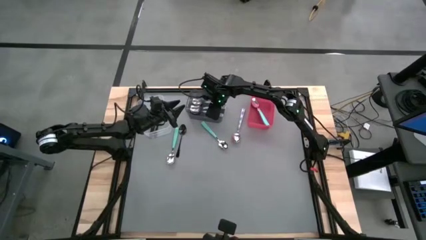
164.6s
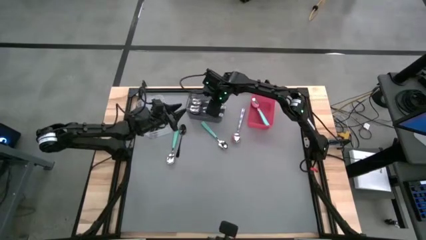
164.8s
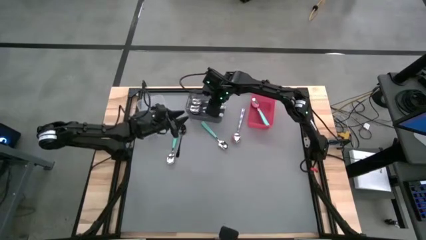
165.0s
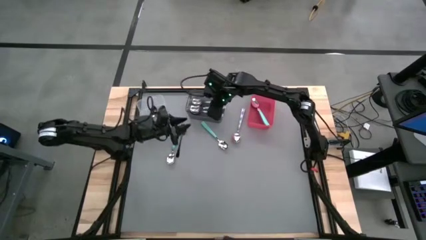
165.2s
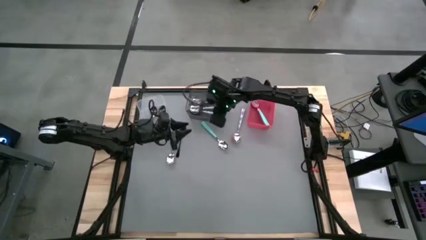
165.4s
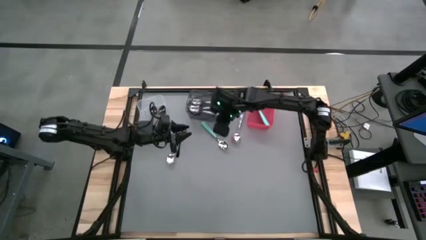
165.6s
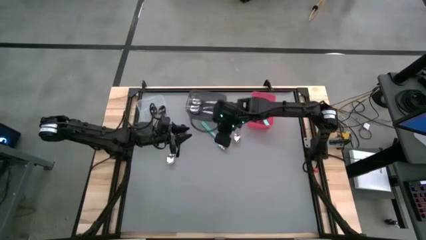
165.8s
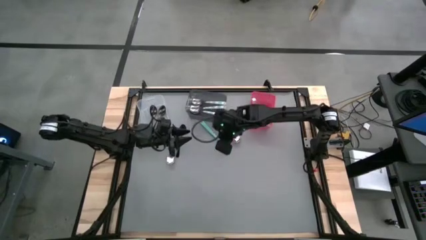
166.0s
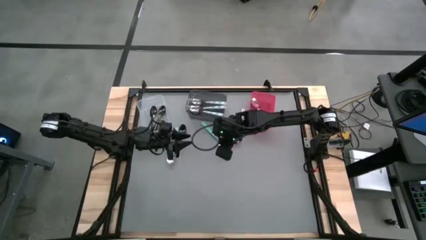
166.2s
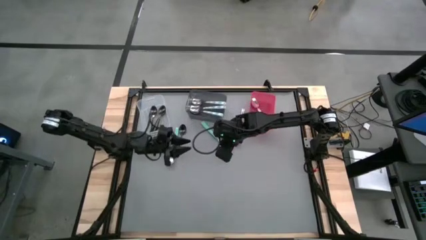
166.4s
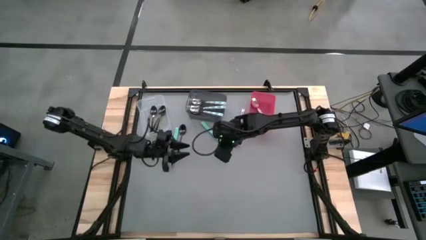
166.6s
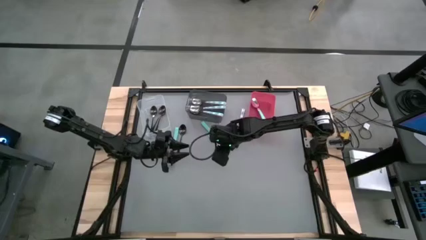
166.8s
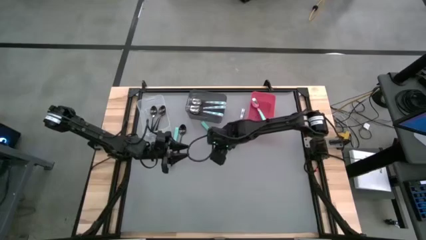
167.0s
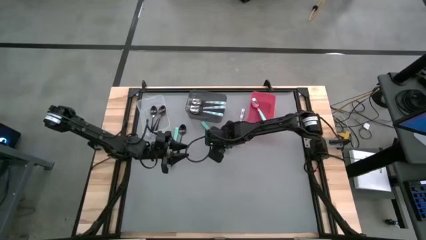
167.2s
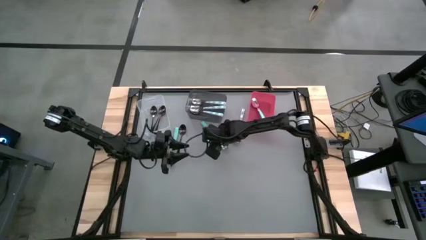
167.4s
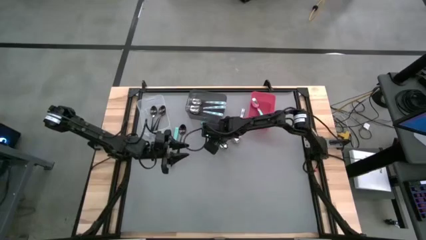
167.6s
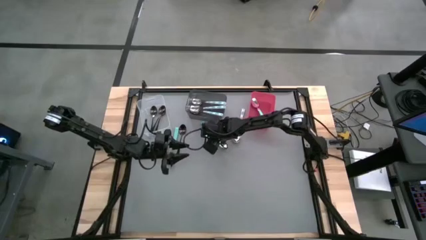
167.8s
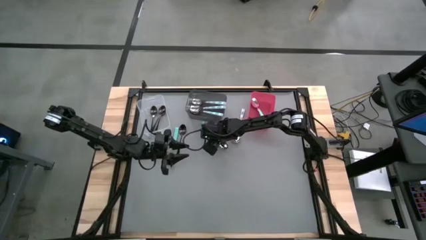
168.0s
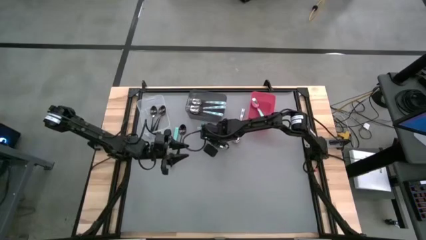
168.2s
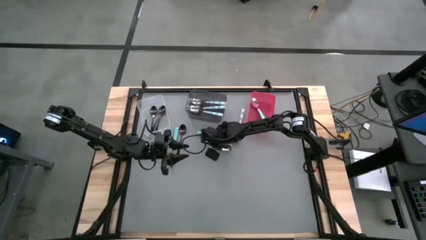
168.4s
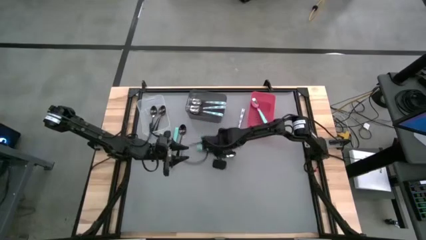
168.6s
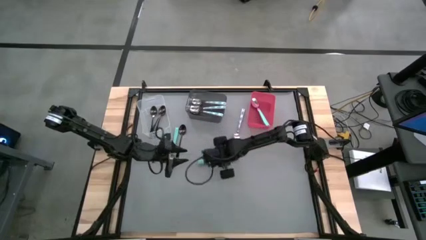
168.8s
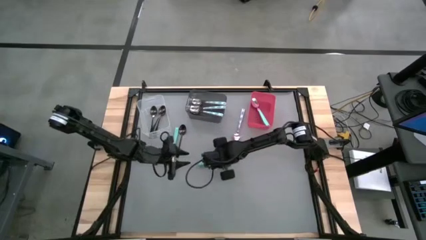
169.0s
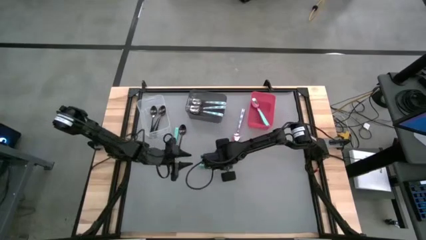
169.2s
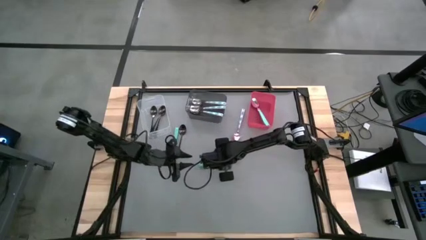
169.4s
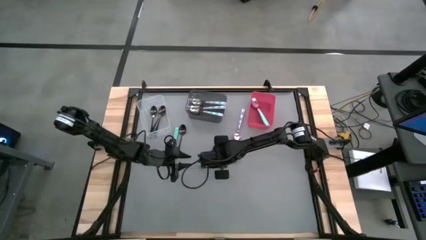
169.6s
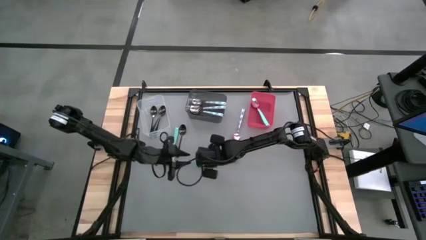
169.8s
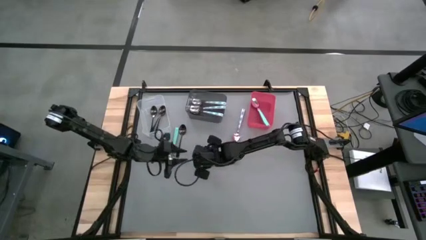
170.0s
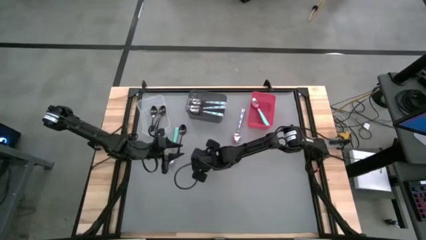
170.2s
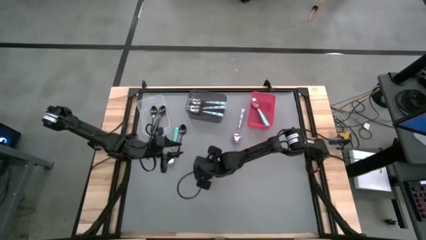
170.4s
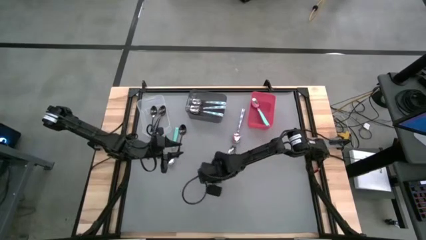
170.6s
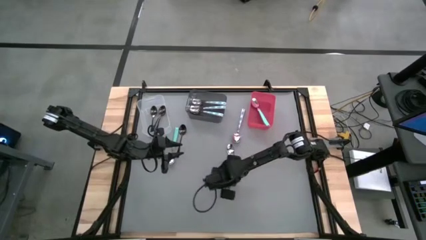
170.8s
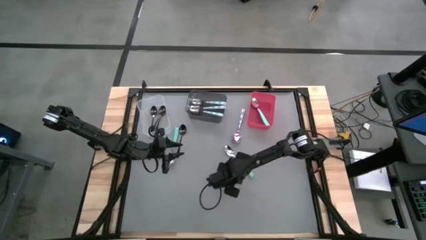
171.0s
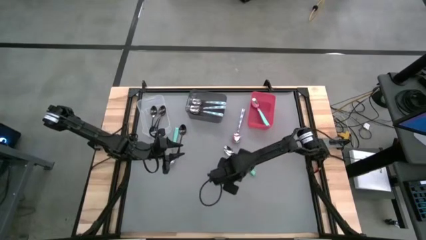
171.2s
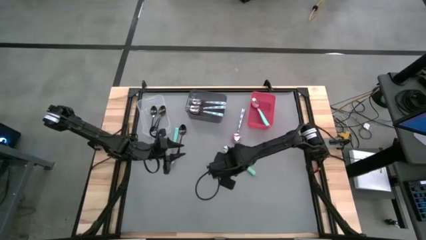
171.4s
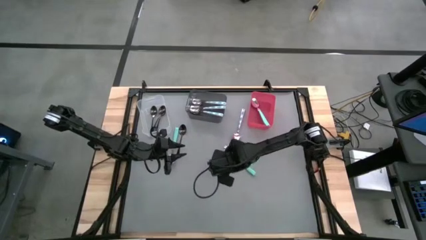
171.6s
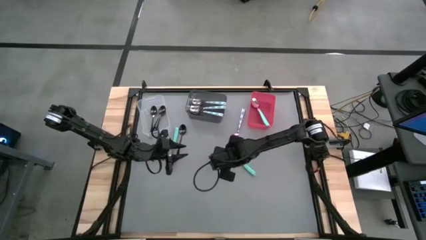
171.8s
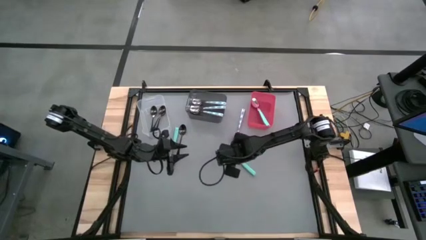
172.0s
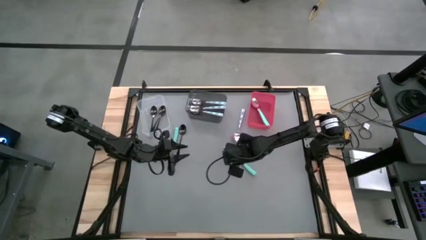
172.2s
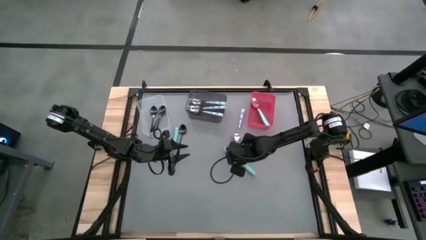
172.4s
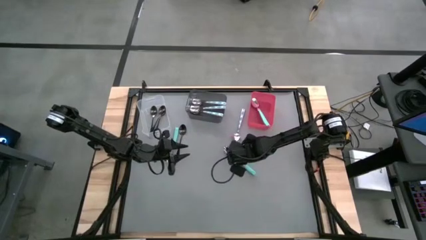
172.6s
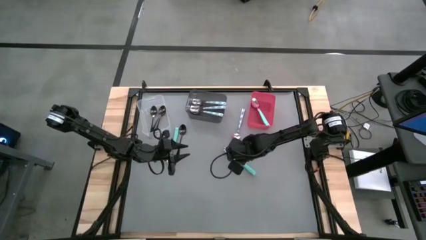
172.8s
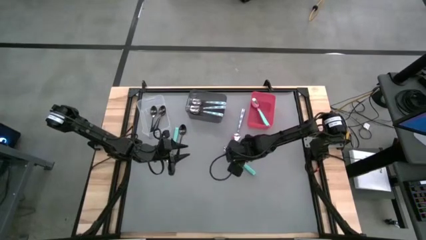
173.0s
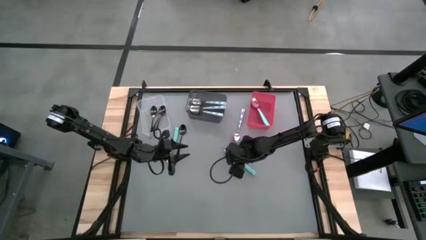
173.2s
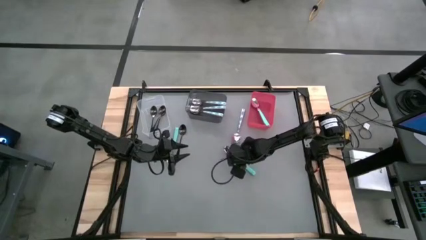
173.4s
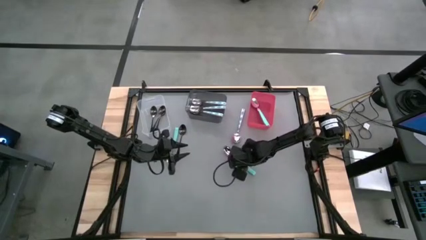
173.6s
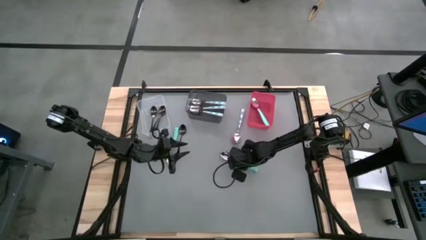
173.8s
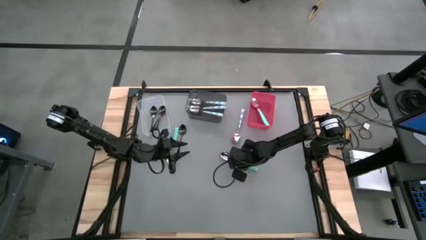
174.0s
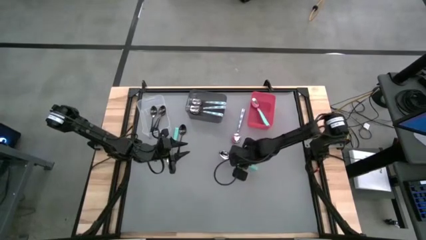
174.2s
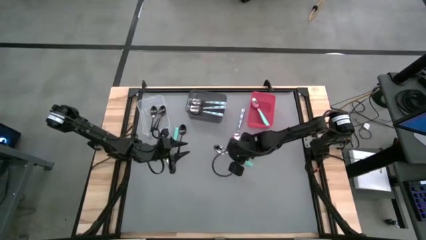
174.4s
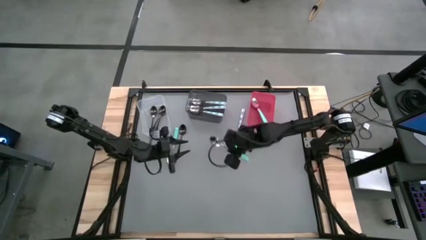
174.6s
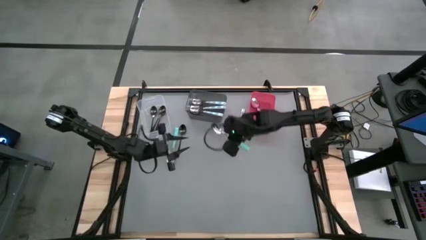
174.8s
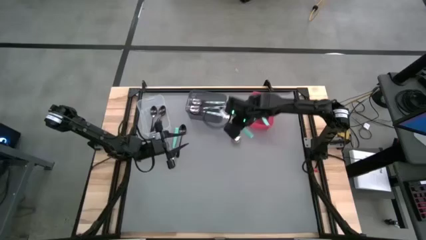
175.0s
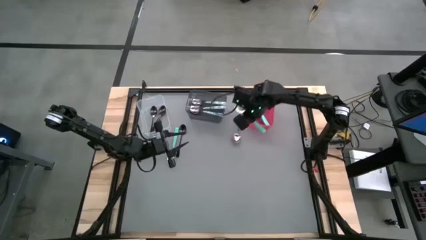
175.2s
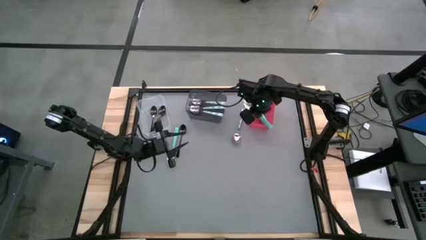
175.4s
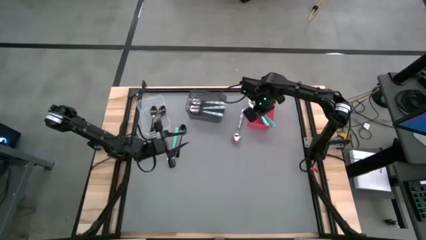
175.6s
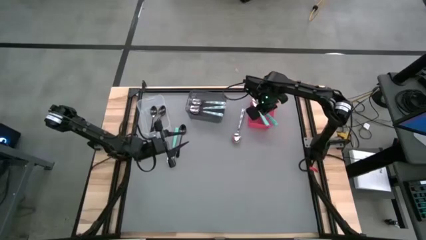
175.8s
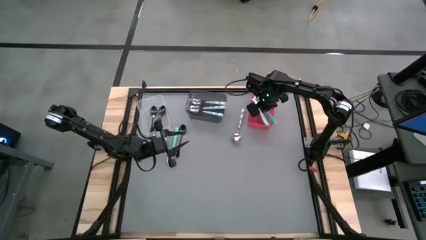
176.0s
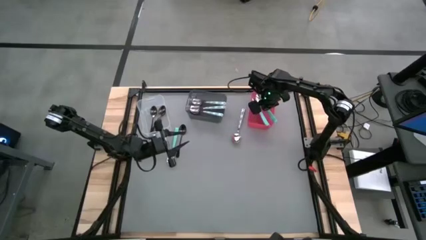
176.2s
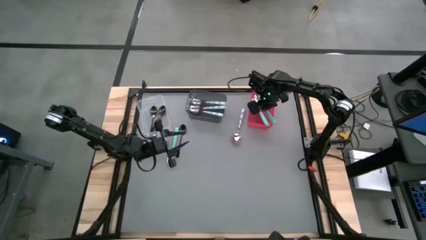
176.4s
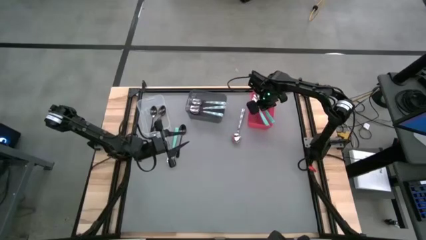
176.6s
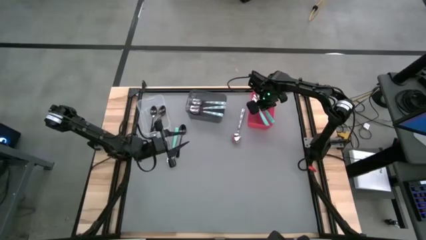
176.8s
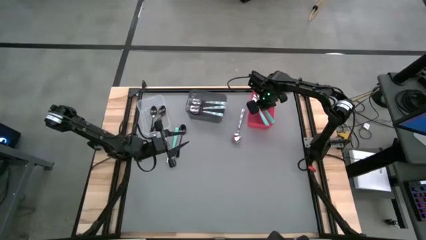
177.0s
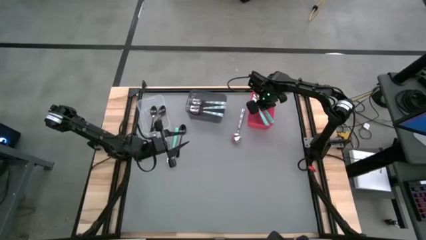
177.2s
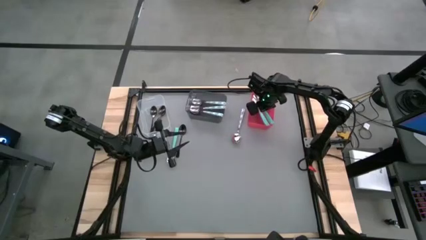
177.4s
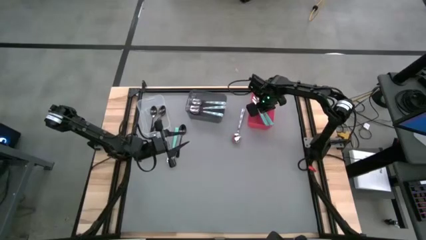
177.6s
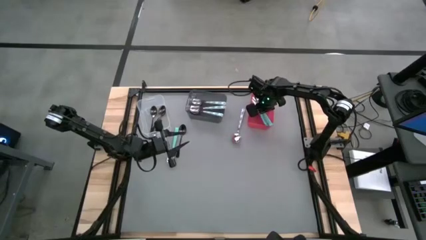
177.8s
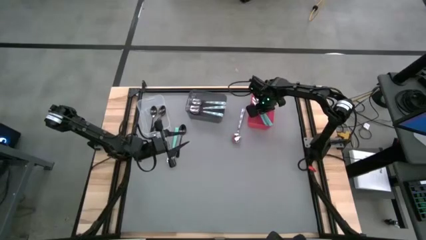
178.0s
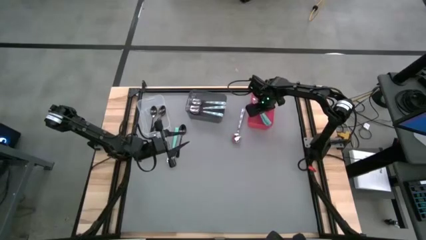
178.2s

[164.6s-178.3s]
Task: Sort silverware by color (type)
Put the right green spoon into the red bin

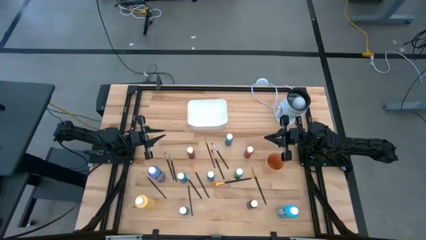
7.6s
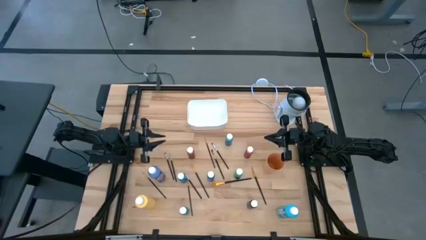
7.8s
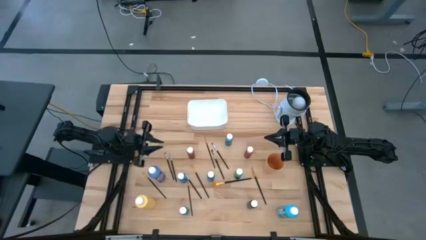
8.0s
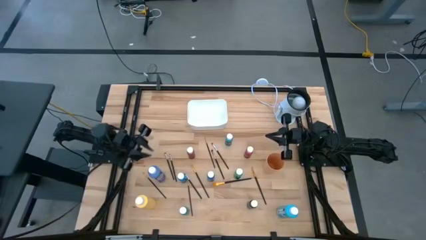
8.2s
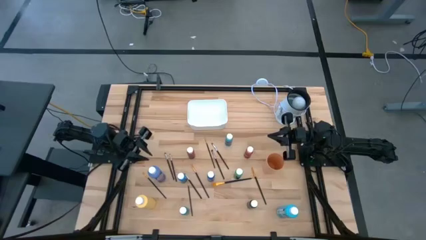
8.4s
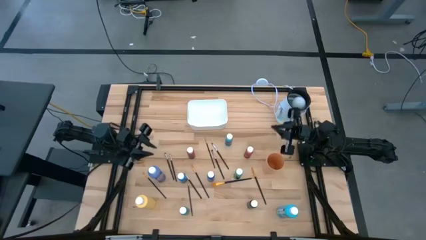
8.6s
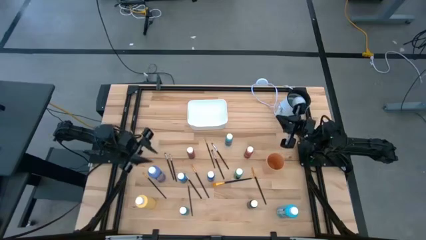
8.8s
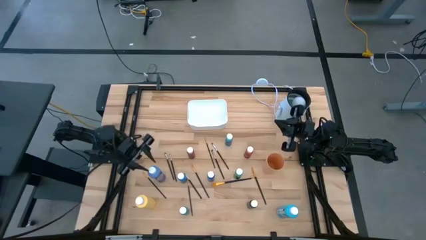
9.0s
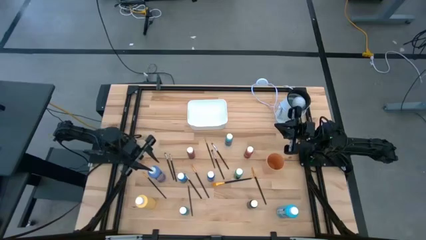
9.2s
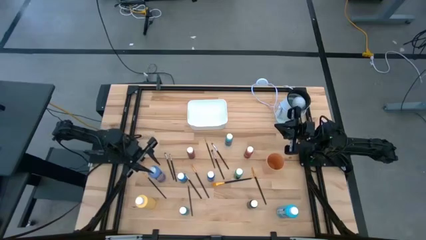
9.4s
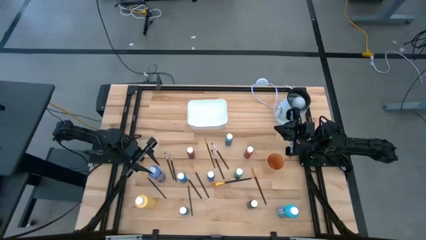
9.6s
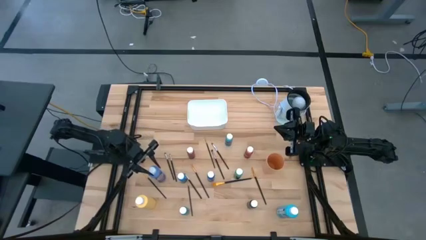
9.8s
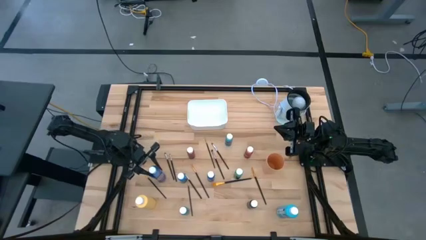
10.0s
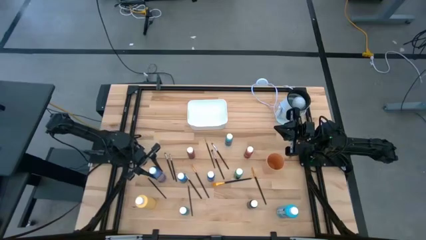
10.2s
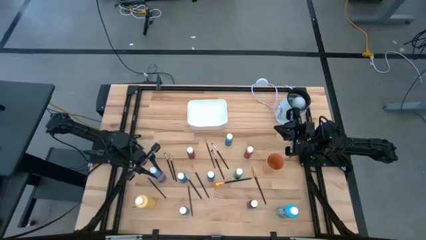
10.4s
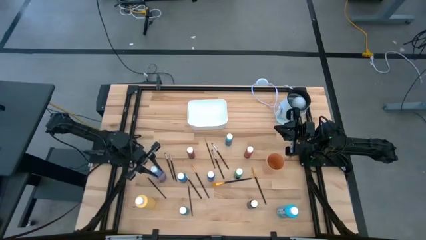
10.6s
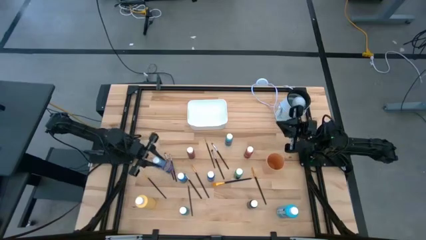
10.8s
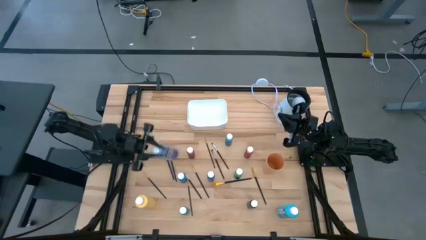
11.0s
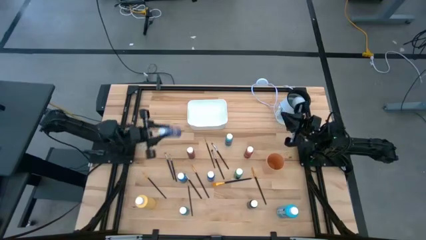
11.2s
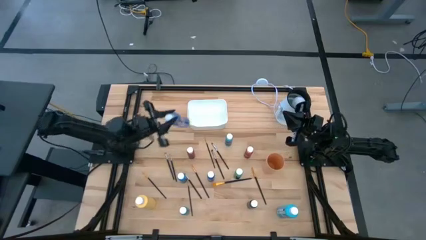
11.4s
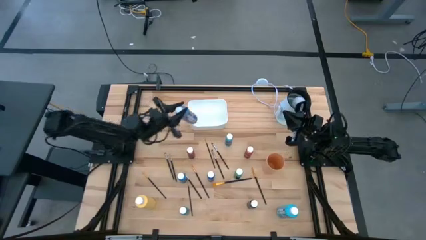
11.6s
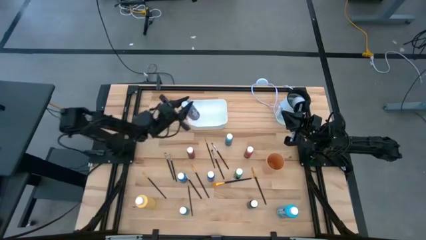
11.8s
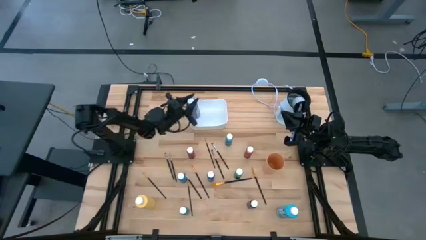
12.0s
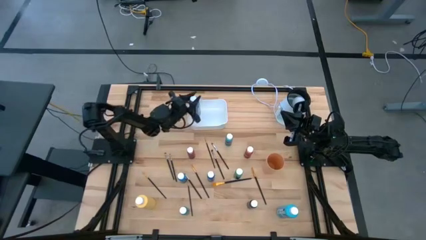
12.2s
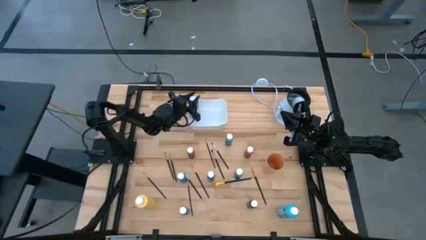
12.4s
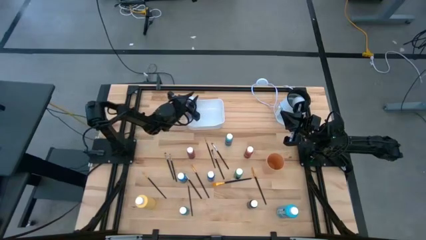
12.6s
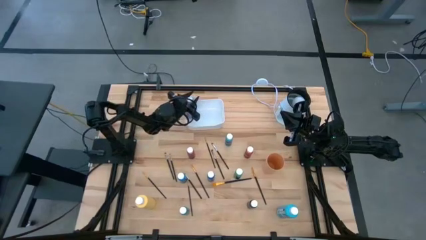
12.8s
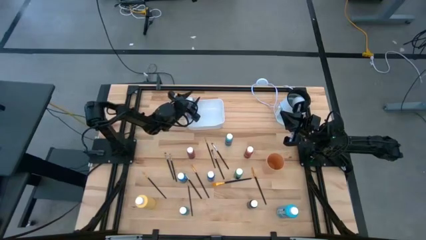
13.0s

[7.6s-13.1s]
Task: Pick & Place Paint Supplies
Put the purple paint bottle into the white bin
